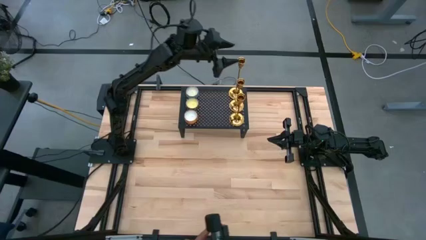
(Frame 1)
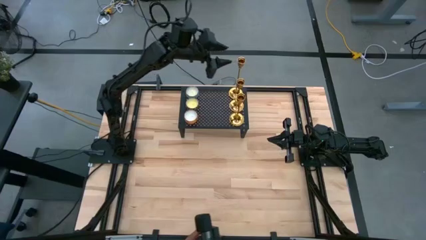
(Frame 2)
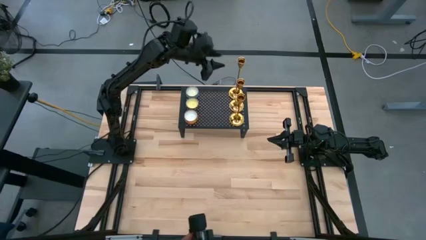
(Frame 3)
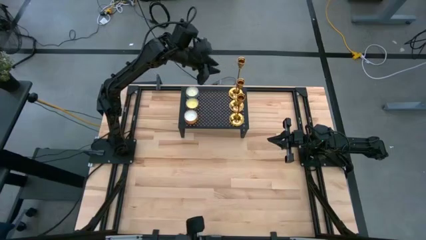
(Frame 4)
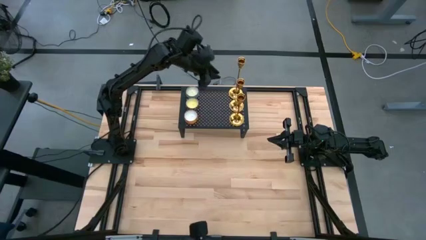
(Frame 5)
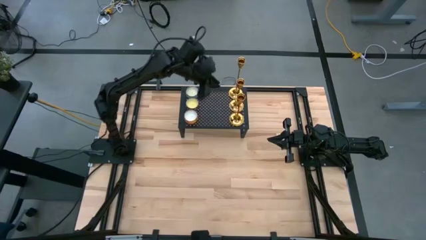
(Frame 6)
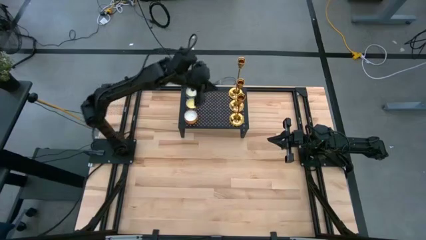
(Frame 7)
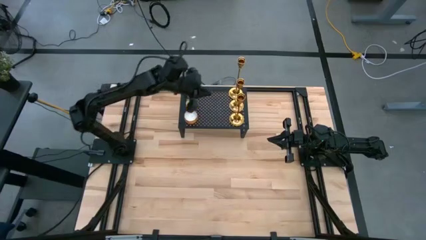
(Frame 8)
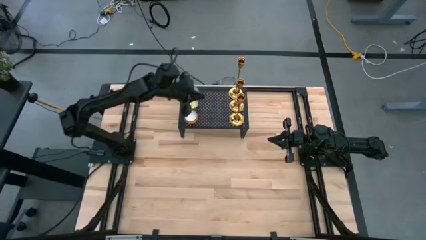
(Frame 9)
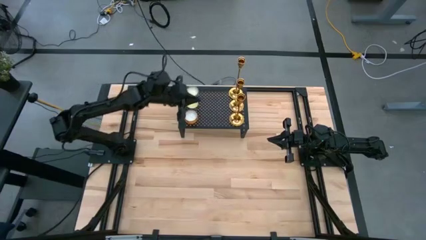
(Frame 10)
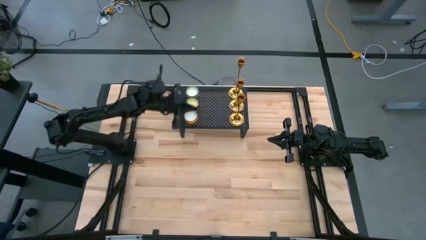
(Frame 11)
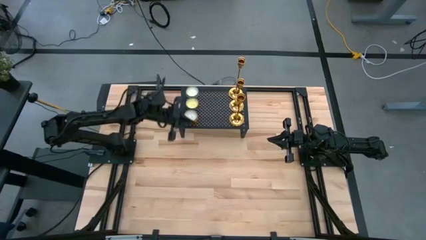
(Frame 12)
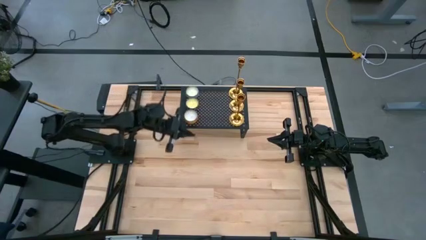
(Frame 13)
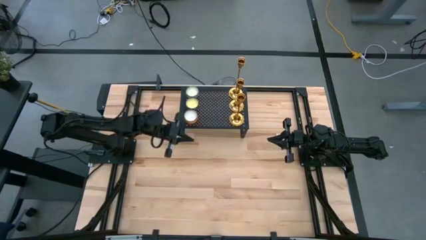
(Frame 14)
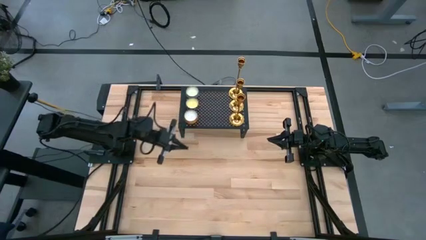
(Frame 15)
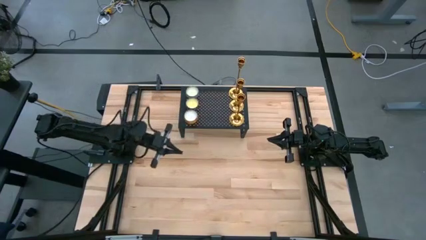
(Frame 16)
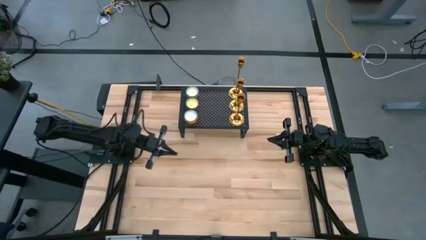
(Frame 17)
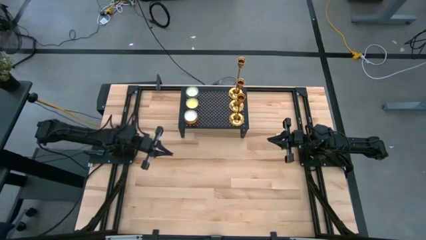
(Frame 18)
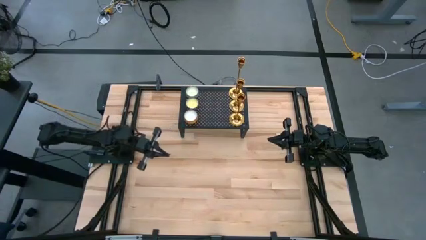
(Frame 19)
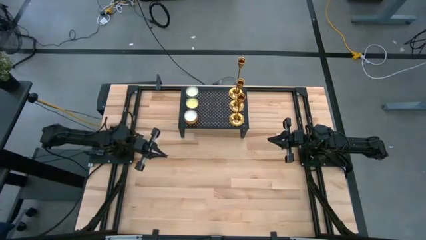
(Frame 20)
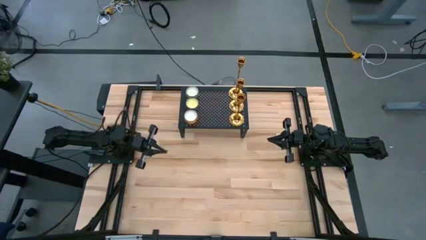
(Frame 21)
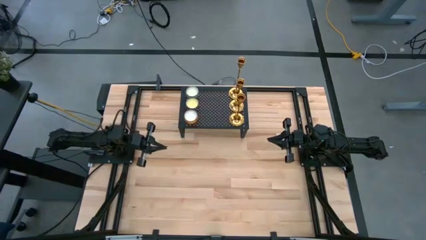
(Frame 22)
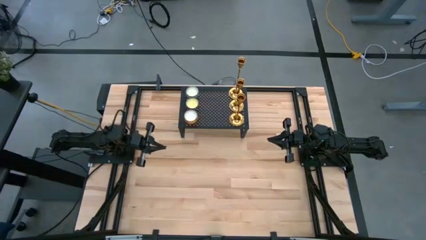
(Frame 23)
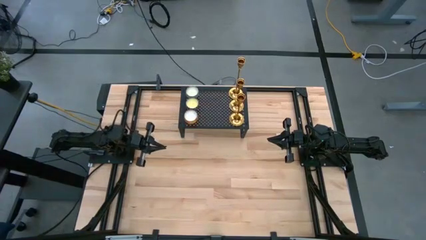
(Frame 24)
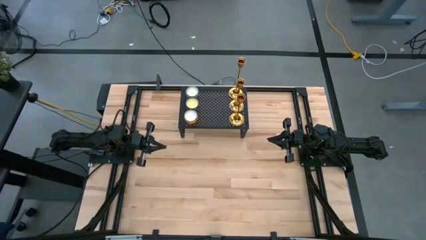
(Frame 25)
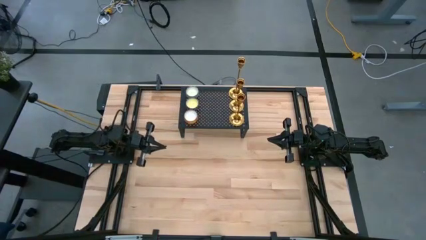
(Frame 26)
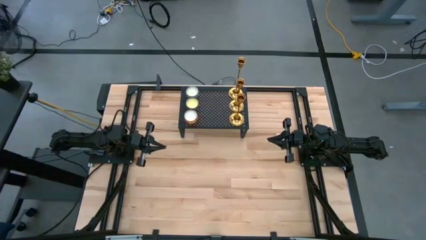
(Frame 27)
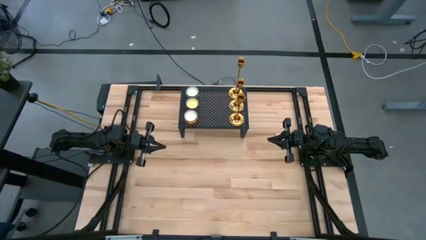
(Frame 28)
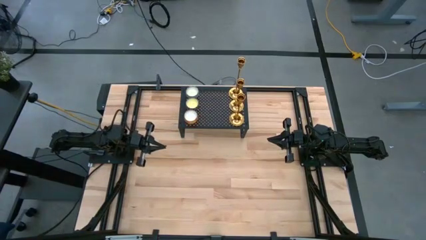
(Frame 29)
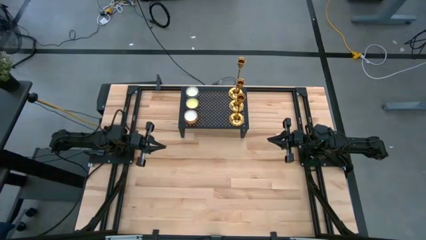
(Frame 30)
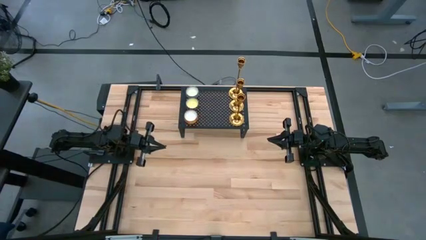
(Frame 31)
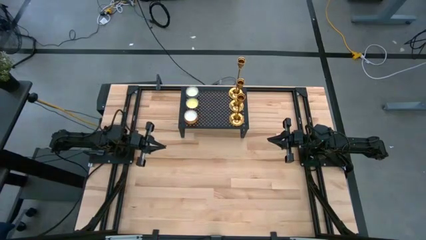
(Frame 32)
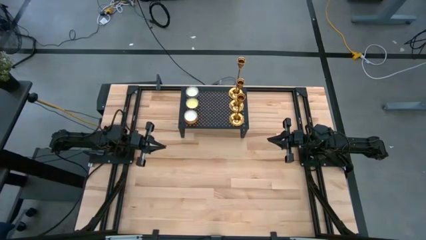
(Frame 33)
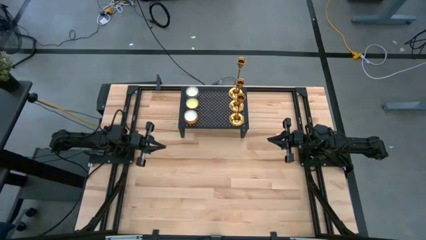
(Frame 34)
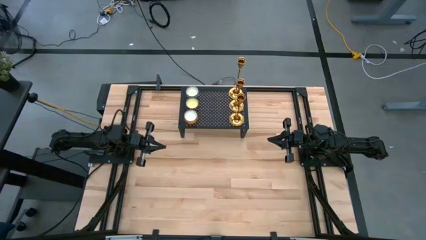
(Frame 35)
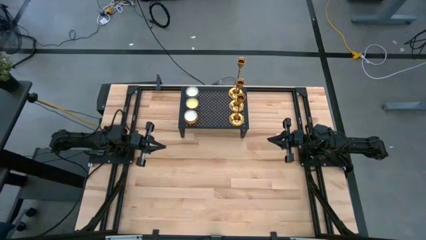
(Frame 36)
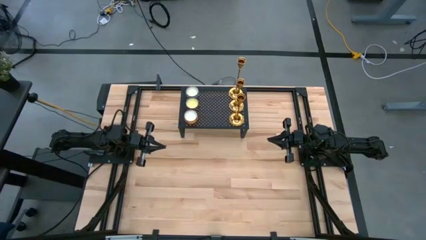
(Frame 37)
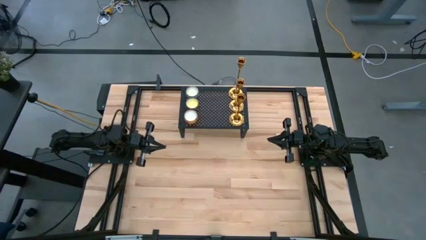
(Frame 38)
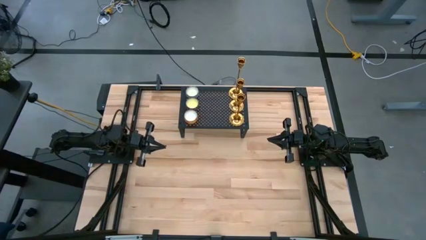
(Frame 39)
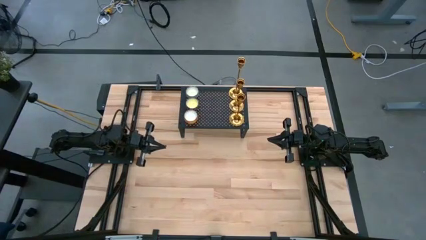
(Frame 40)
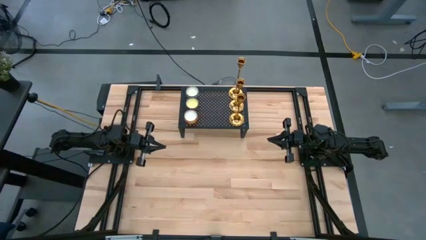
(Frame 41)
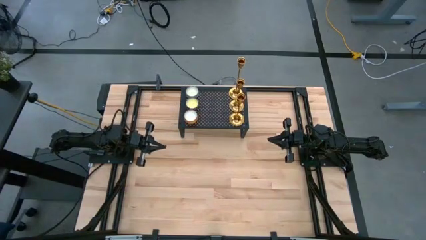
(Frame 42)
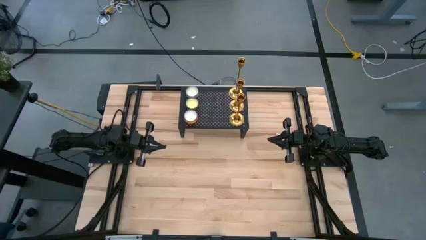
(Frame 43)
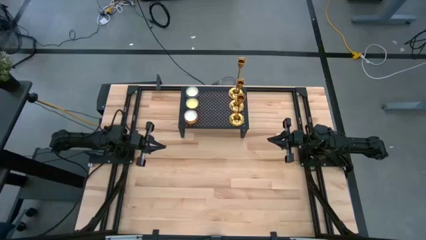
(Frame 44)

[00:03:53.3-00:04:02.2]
Task: Pick & Place candle stick holders
Return to Home Position

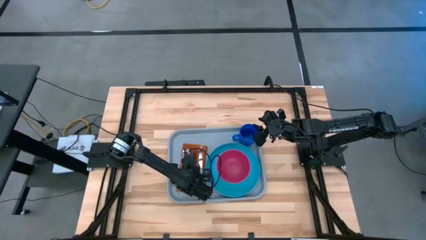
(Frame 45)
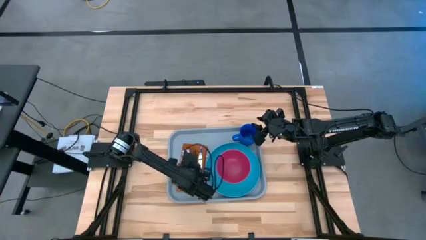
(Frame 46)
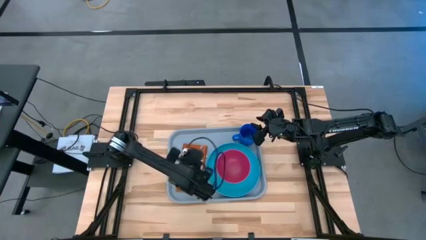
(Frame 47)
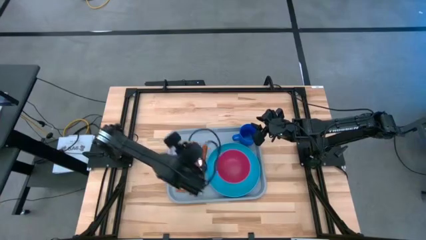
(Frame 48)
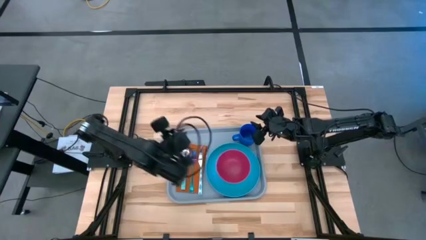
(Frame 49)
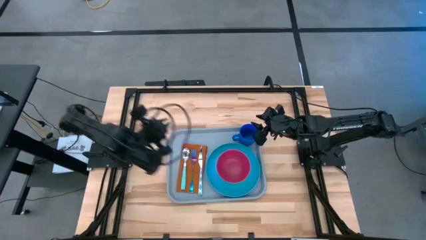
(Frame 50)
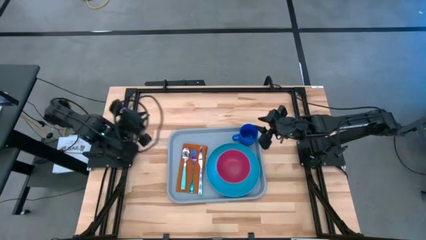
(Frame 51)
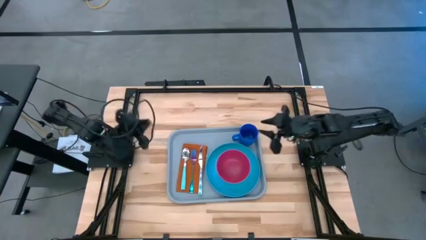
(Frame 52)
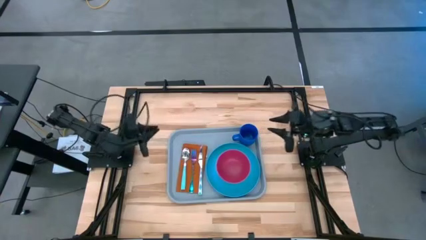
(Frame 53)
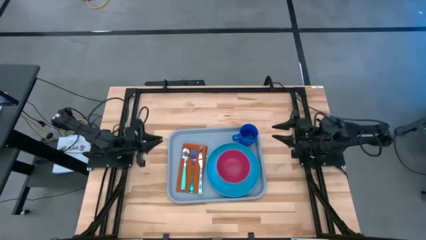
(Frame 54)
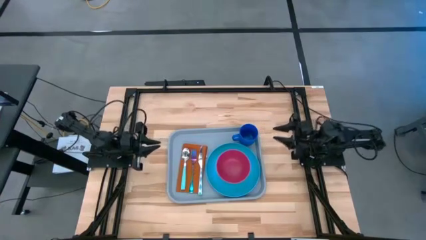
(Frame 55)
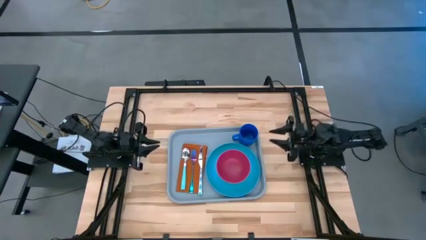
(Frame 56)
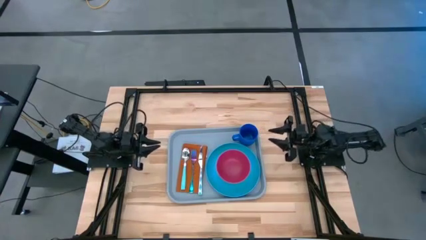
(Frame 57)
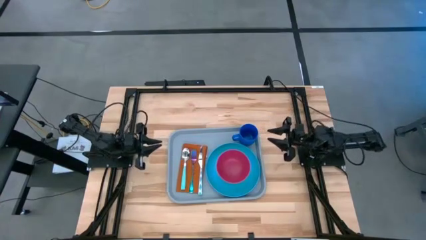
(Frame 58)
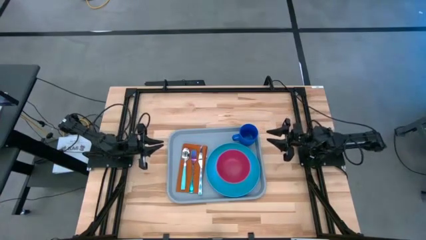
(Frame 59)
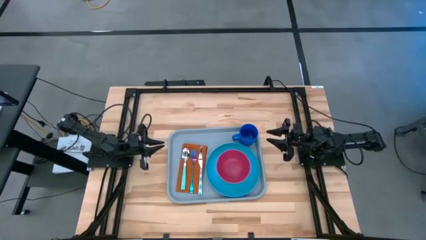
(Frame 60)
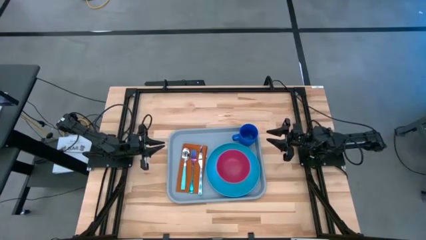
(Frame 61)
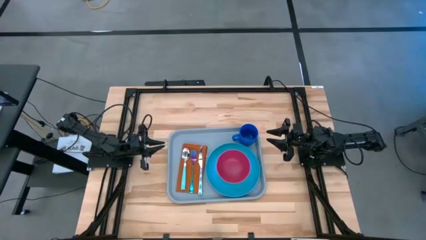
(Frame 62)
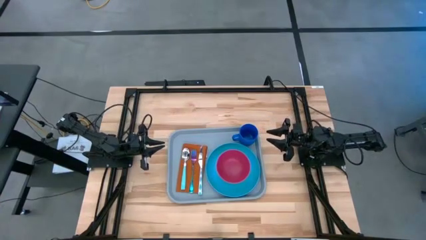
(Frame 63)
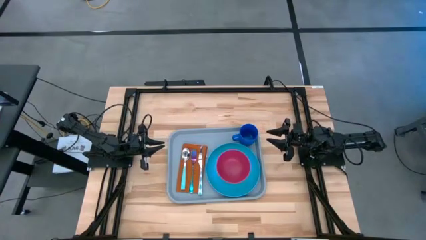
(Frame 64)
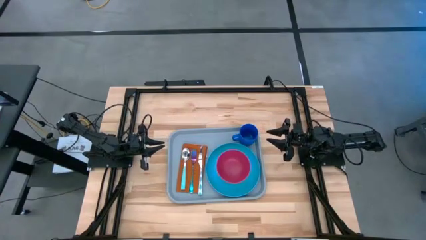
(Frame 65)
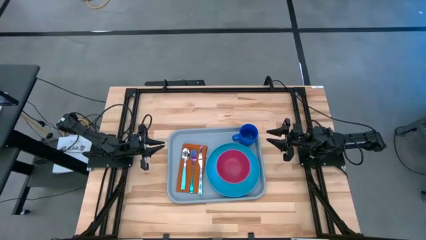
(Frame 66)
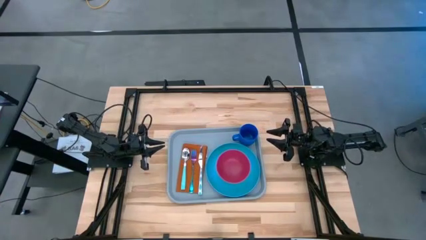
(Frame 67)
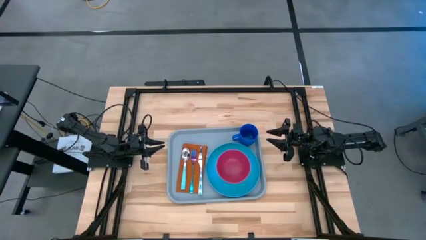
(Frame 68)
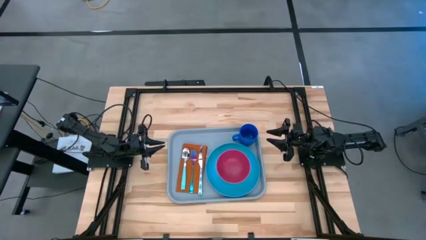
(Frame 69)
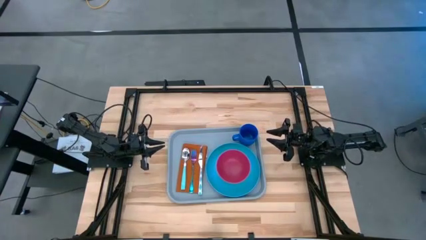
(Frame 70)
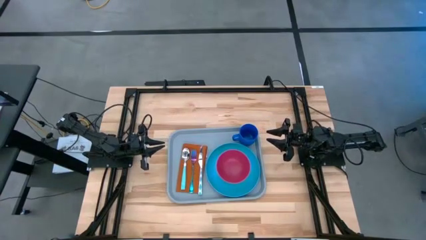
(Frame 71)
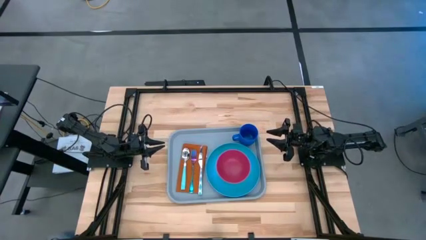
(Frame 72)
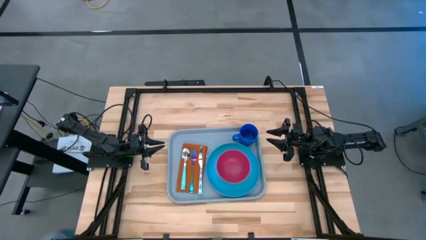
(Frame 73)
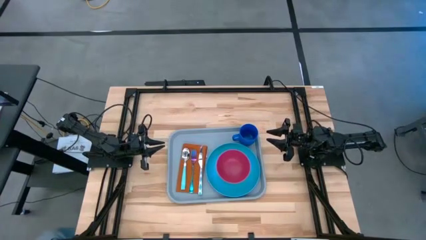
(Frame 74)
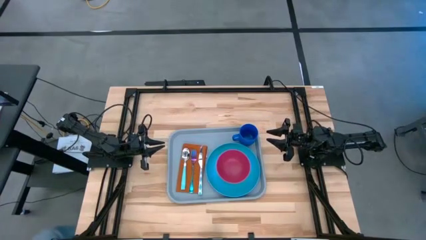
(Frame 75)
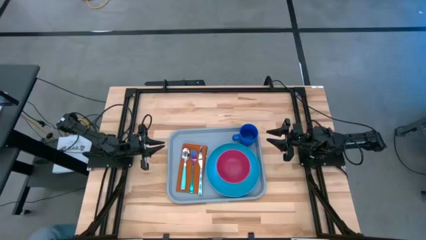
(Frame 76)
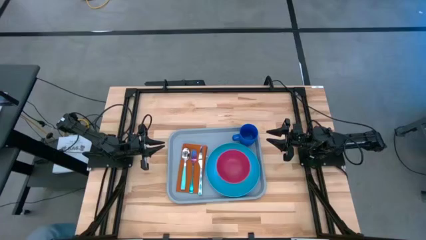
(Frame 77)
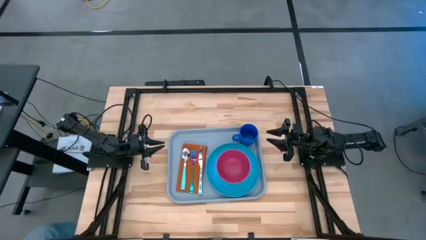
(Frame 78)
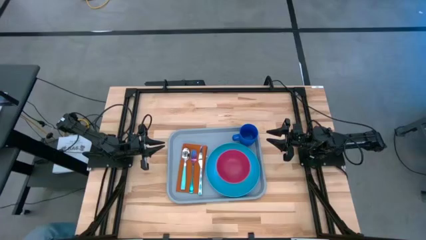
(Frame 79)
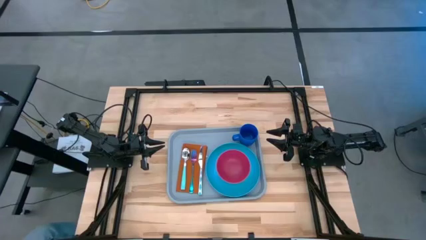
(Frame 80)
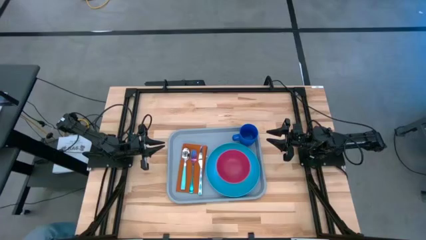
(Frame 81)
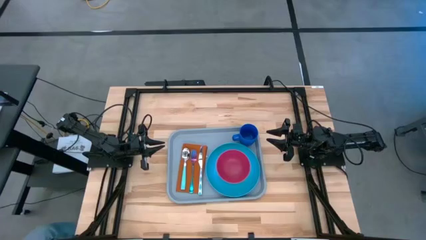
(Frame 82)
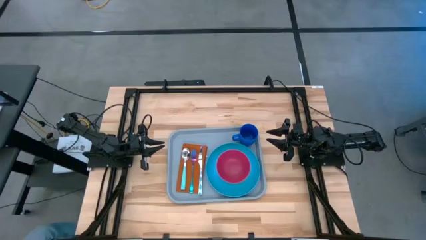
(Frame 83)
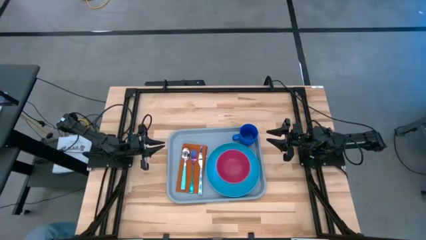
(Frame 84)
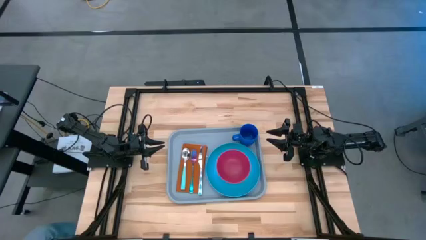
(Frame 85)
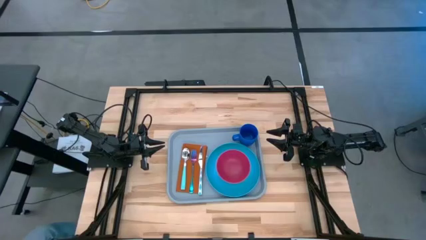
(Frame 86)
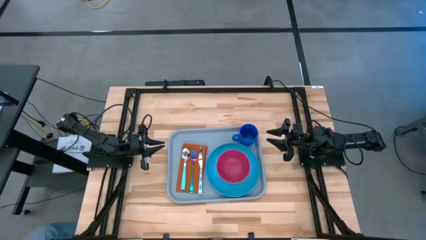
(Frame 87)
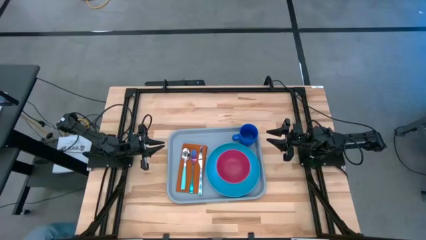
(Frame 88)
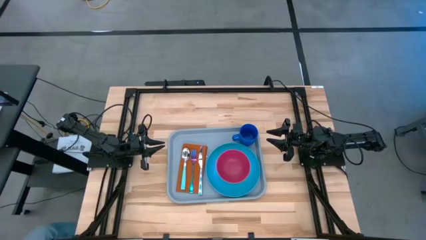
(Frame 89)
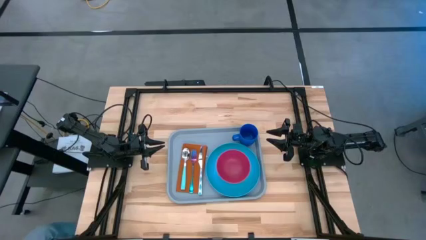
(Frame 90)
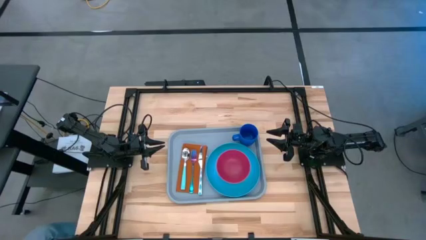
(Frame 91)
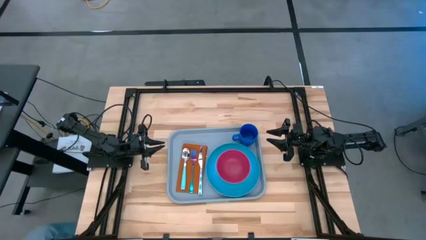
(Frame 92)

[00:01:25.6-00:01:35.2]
Task: Set up tray
Return to Home Position
